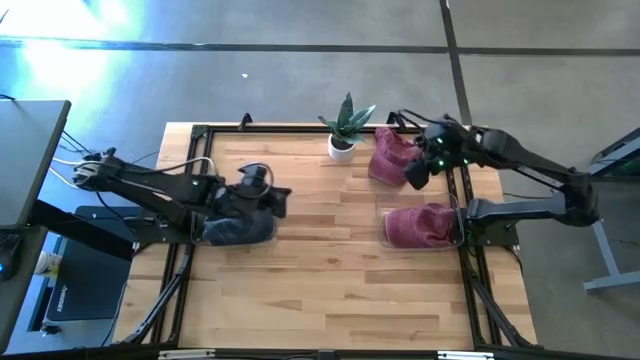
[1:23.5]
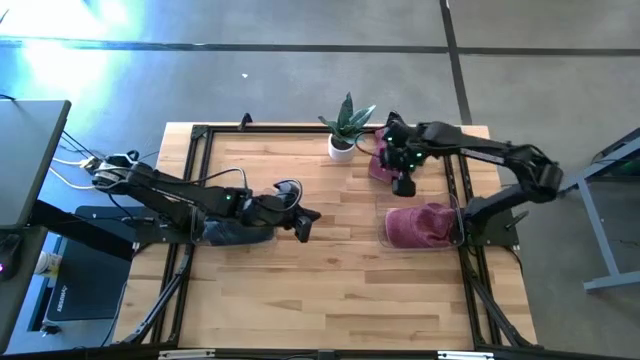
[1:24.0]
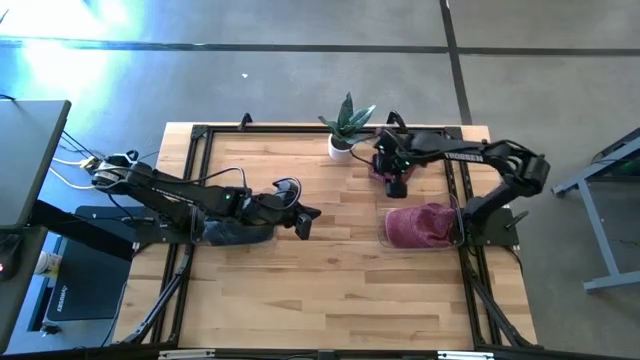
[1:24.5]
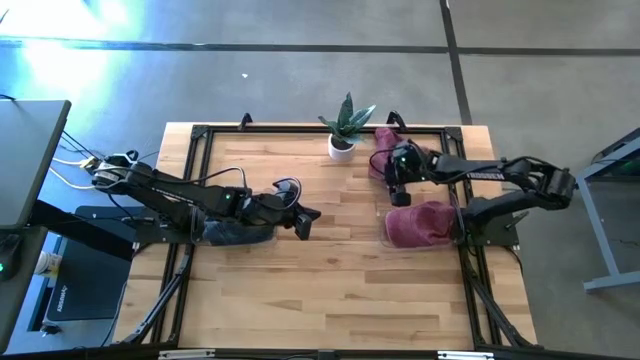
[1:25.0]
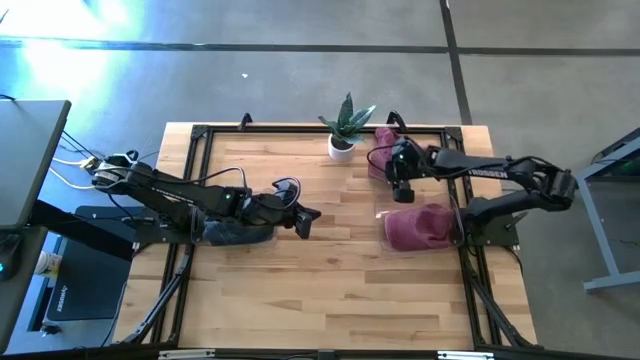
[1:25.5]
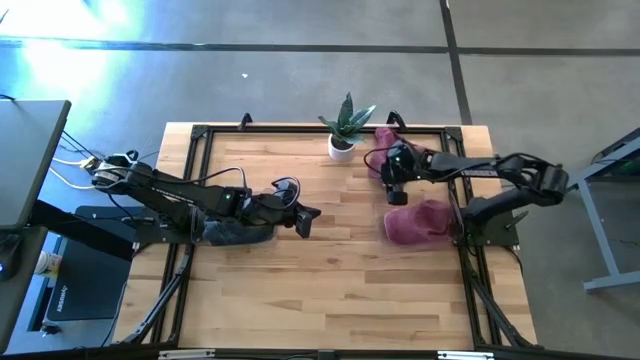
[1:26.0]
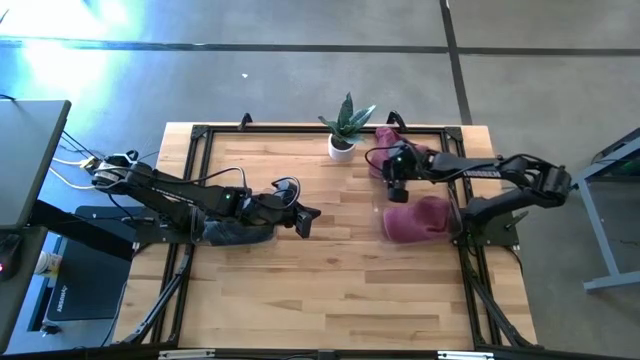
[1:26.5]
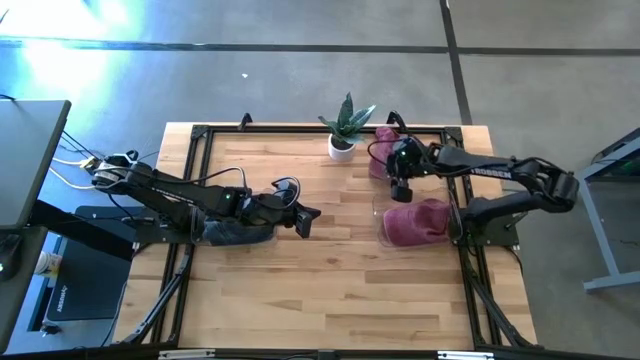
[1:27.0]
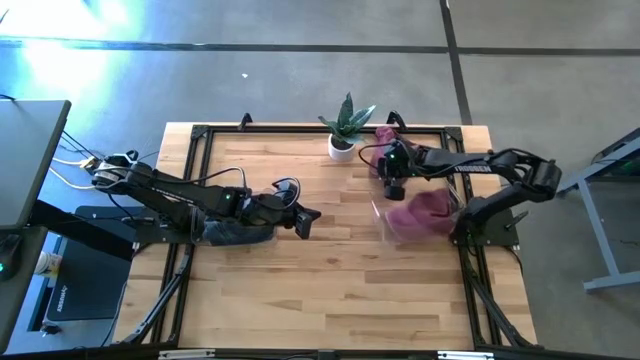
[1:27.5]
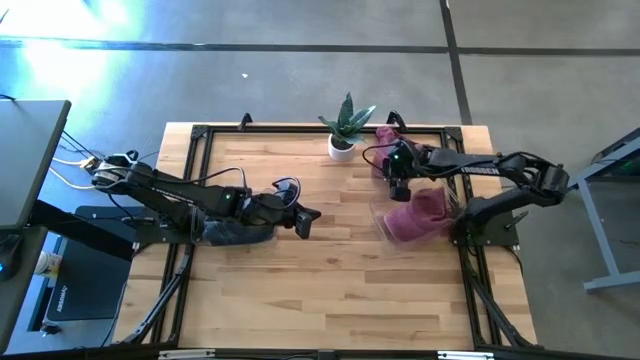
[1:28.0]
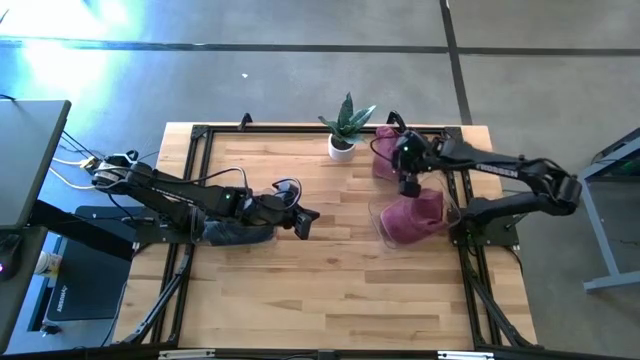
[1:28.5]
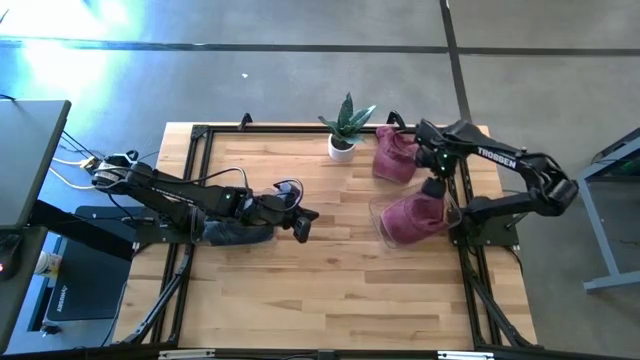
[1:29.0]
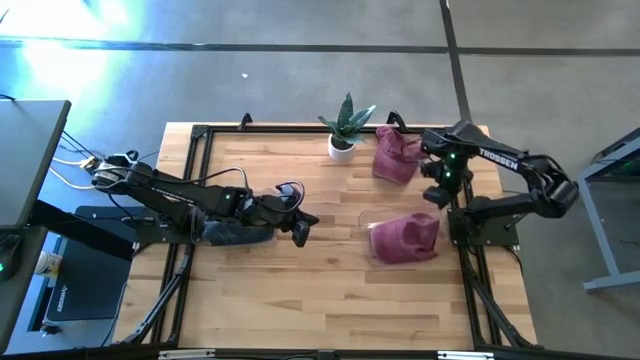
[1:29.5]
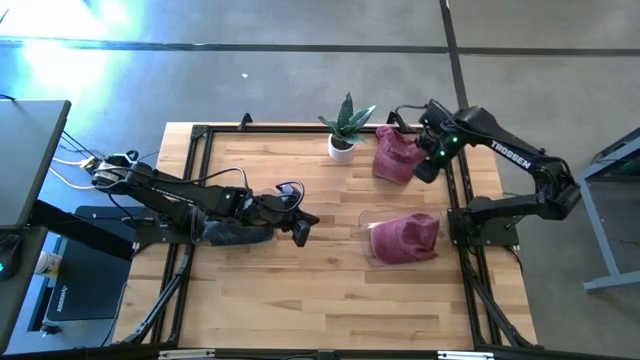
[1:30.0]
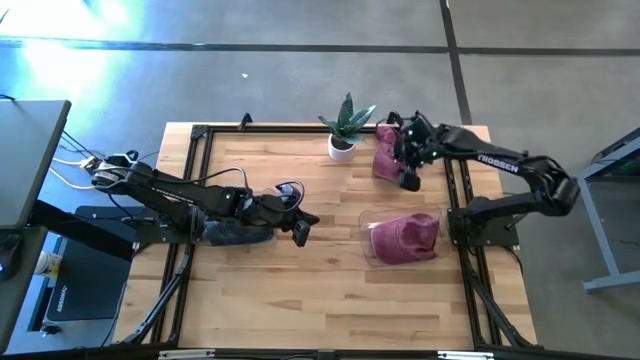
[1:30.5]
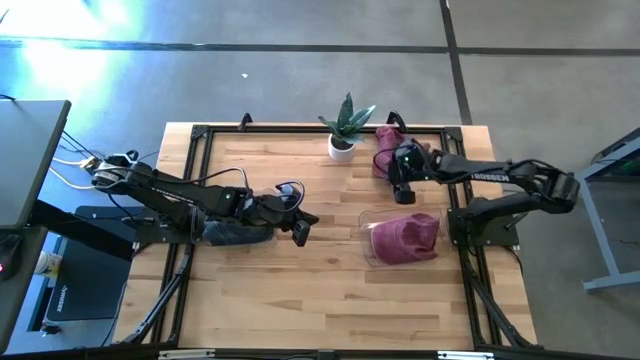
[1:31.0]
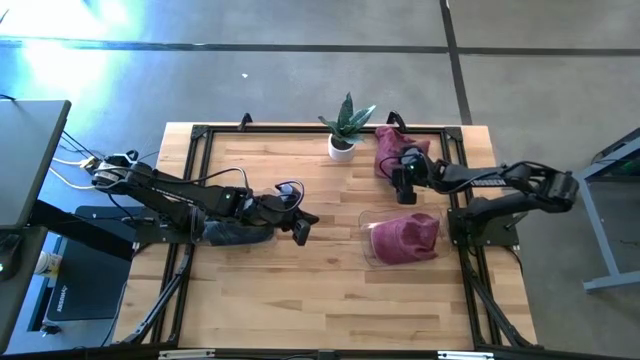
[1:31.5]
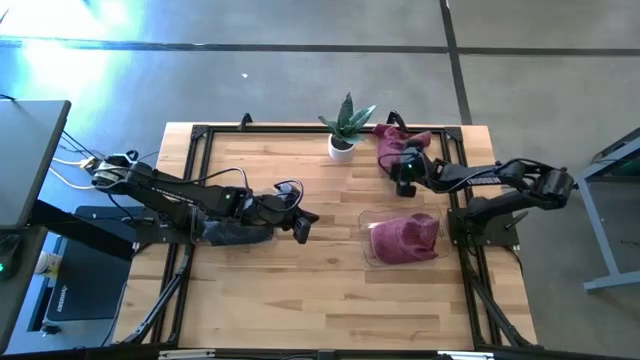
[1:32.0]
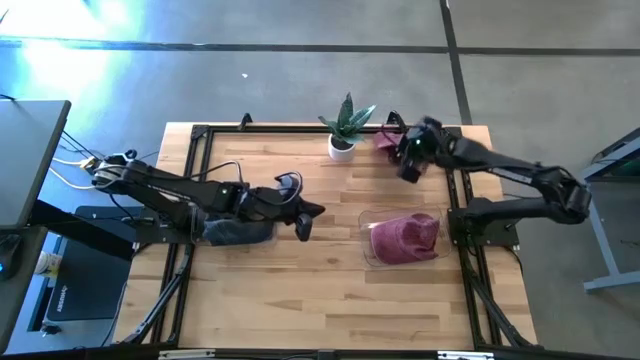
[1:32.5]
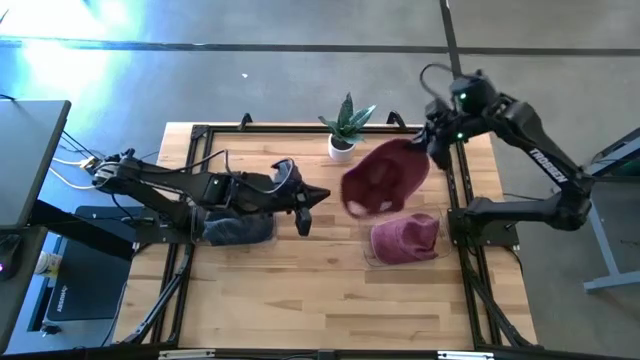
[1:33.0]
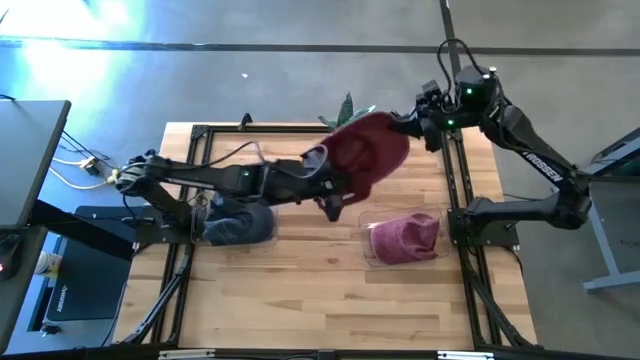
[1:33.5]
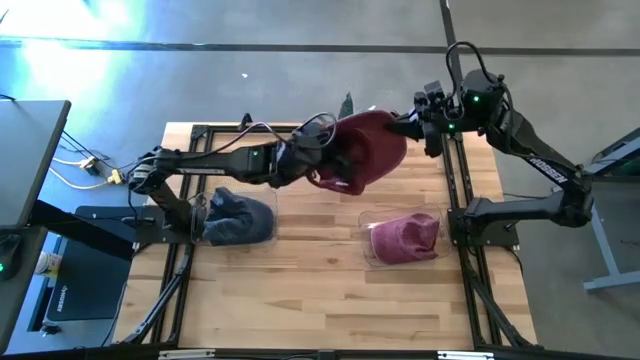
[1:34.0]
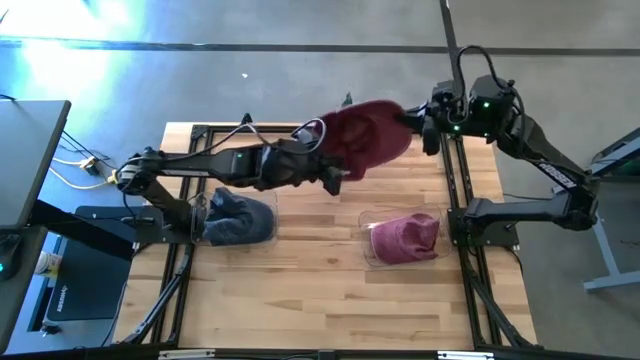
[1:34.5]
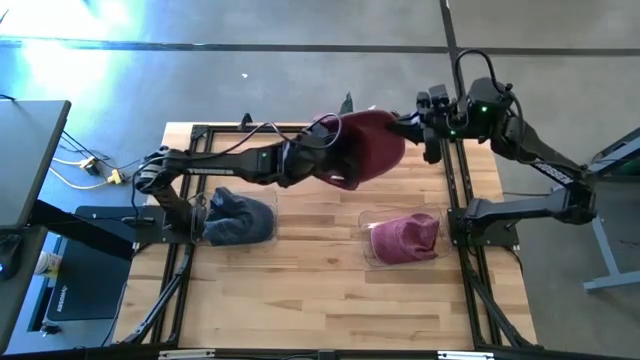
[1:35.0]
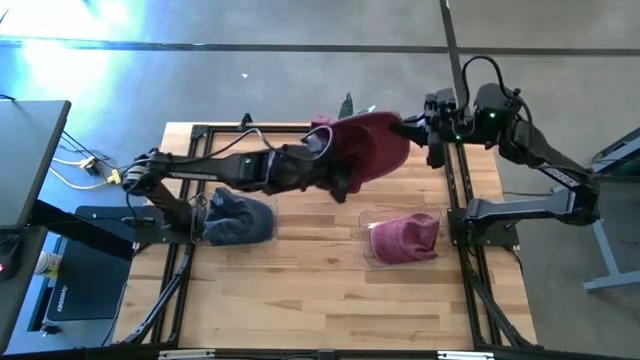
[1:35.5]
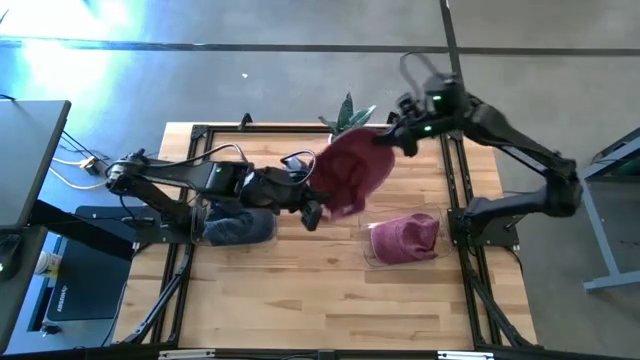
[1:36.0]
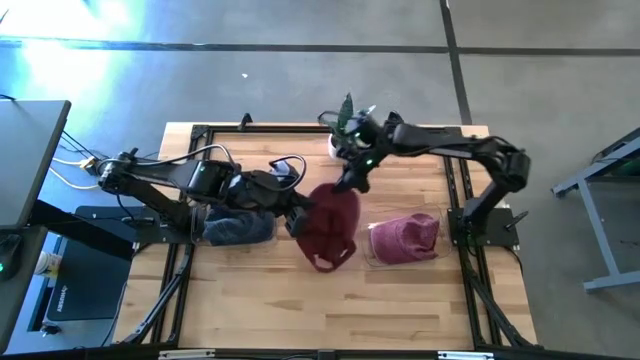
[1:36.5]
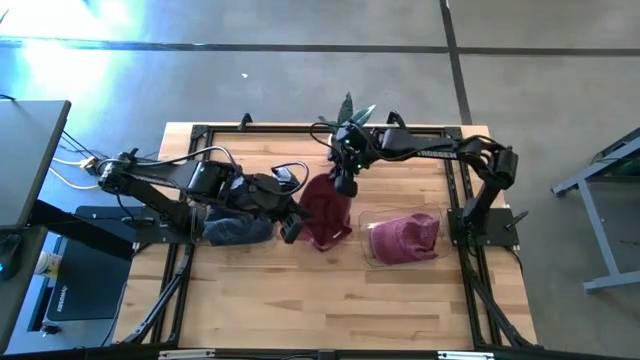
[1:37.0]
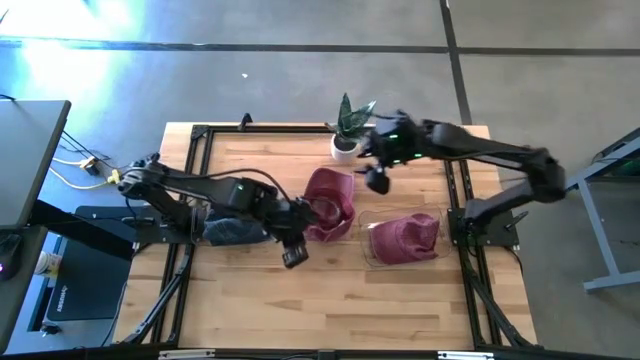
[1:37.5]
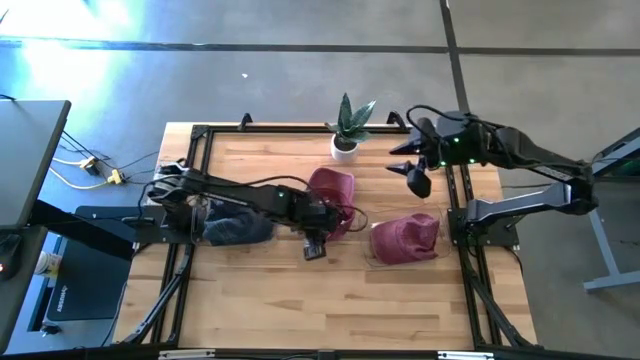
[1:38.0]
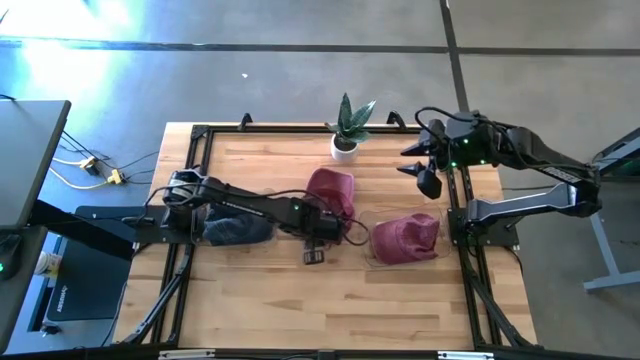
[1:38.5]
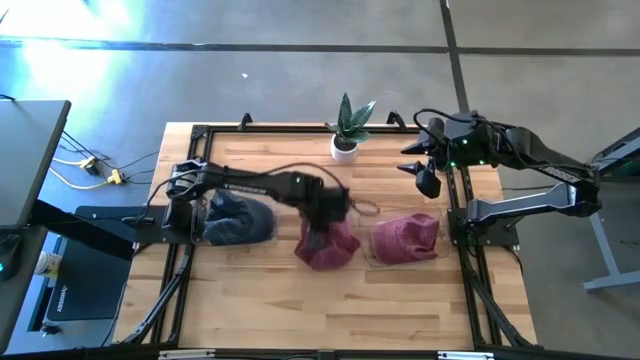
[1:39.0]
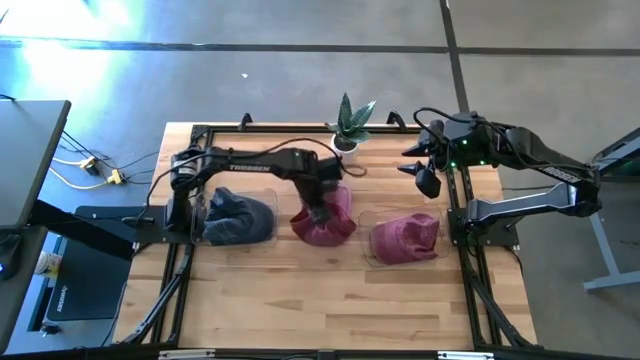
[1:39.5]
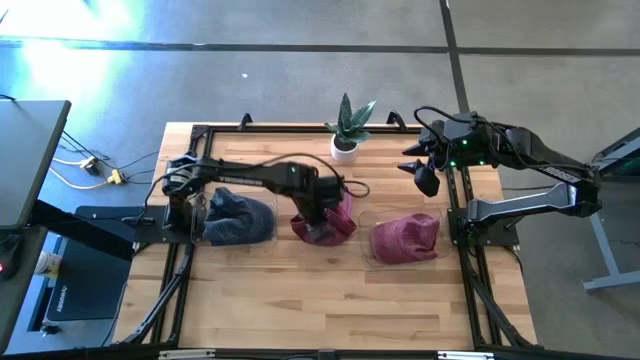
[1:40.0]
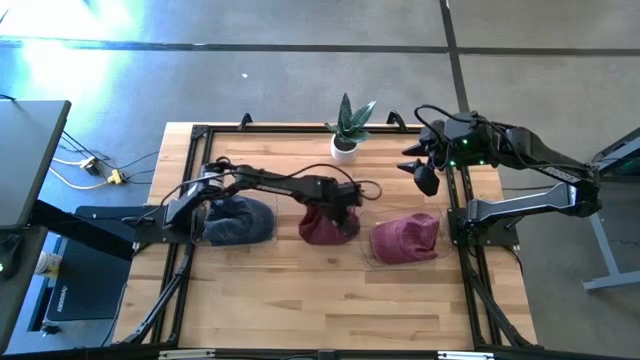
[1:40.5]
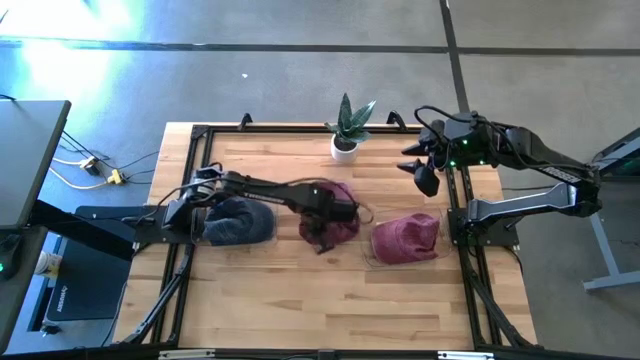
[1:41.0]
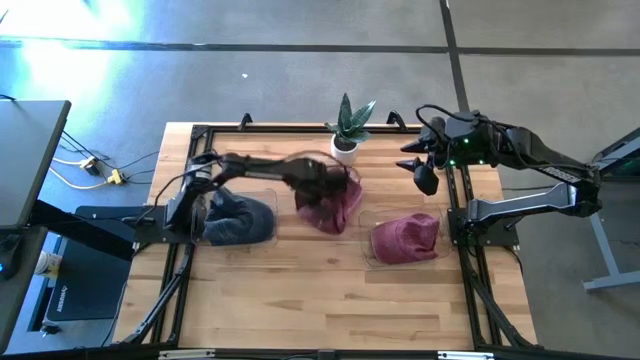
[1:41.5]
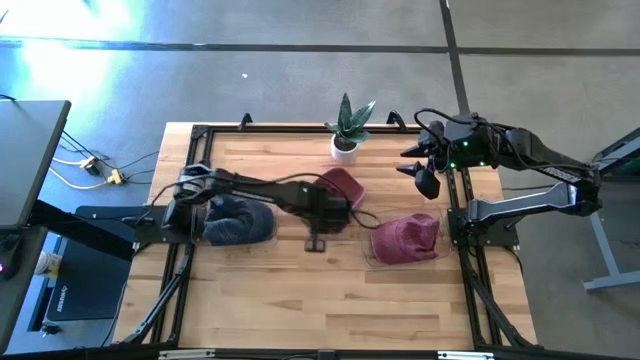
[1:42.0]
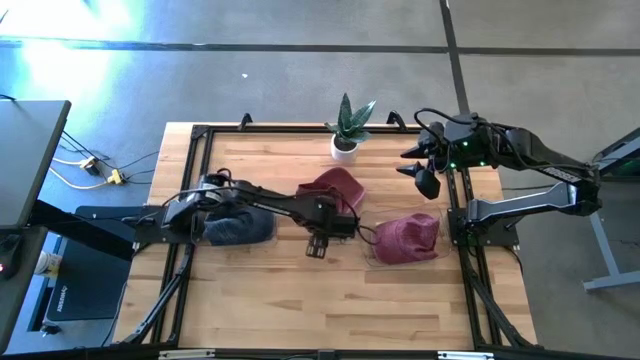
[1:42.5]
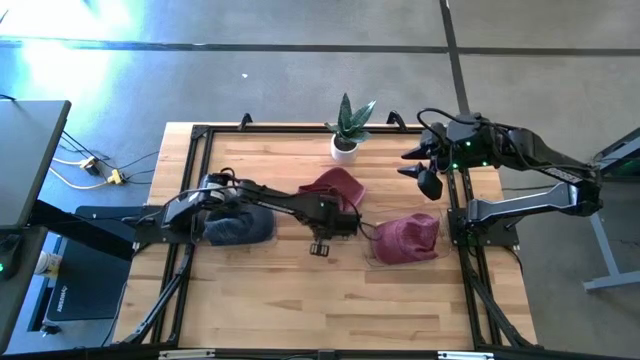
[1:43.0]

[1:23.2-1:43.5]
Task: Pick & Place hat
Put the red cap into the right transparent bin

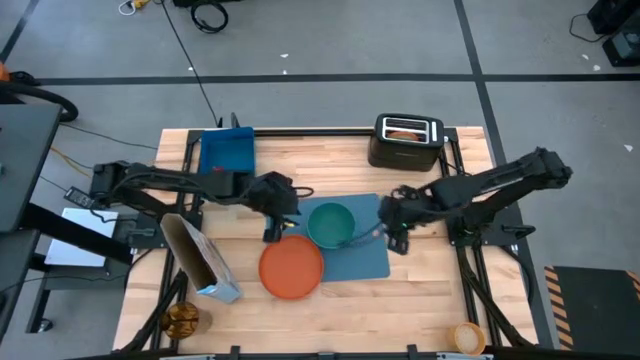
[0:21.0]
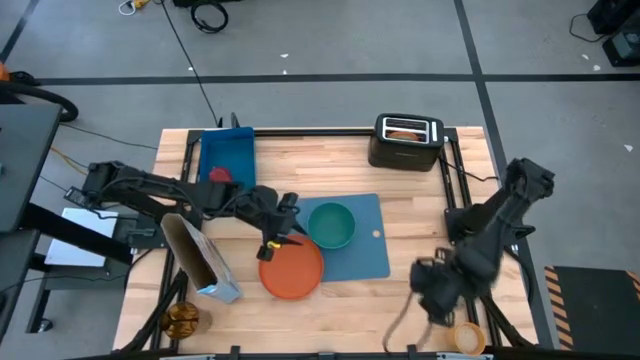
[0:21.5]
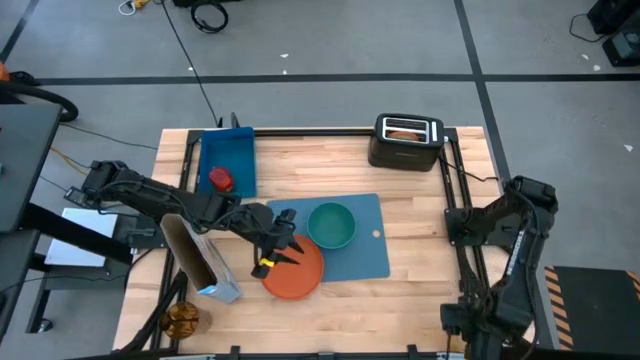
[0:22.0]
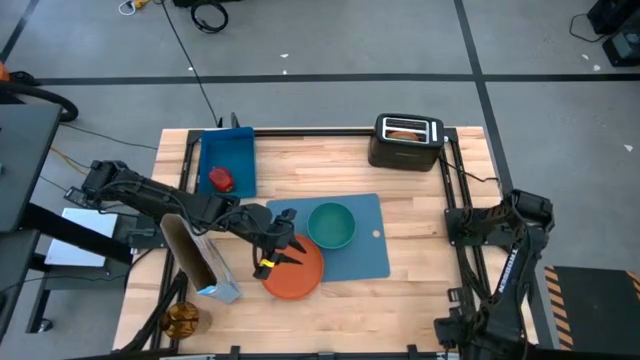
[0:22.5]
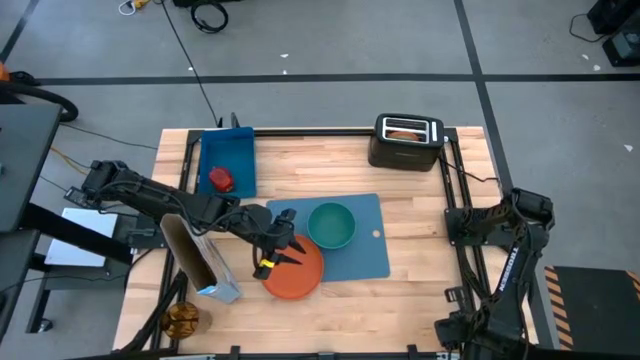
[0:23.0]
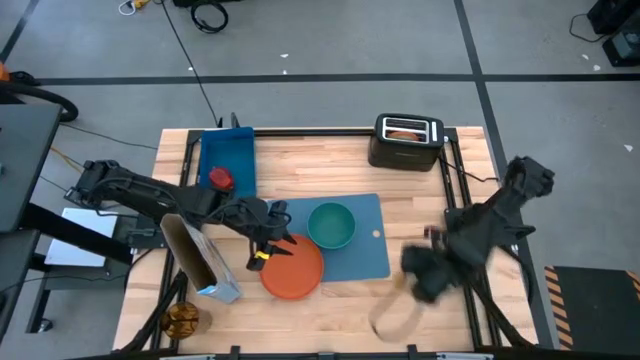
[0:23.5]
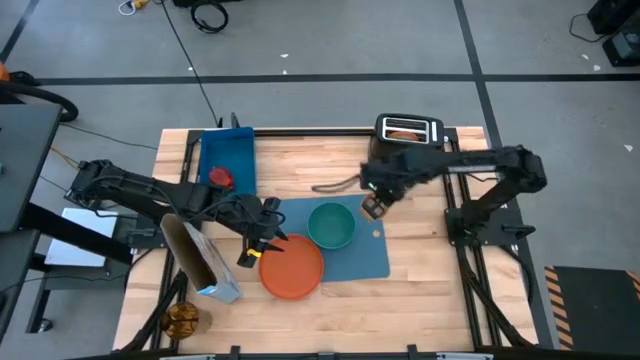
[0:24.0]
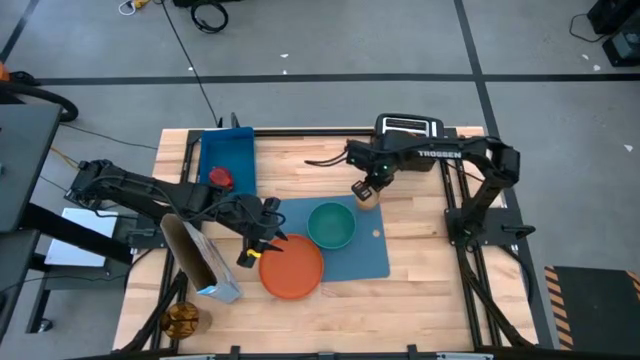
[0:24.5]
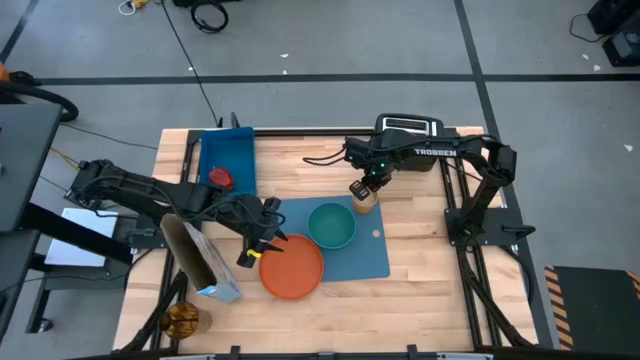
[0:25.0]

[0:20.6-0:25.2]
Task: Arrange a breakfast setting
Put the yellow cup on the blue table mat to the top right of the green bowl
